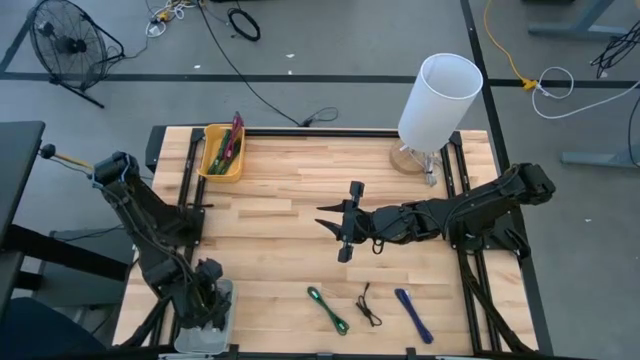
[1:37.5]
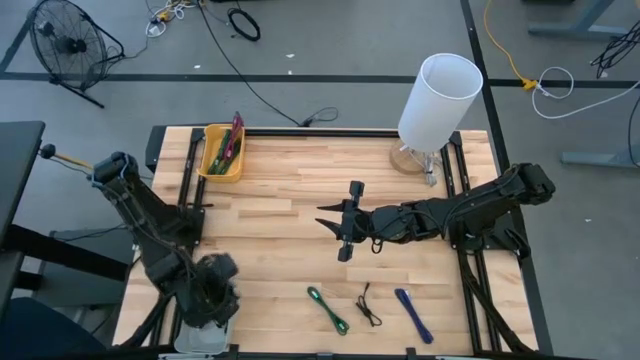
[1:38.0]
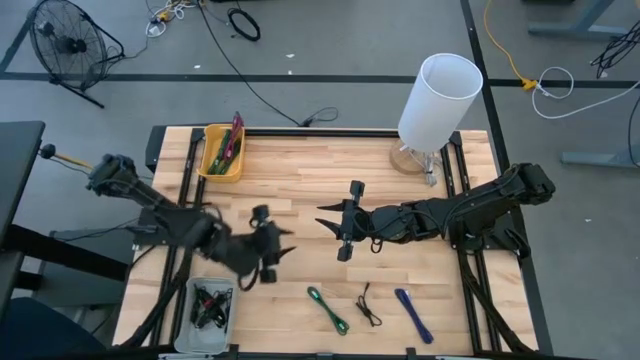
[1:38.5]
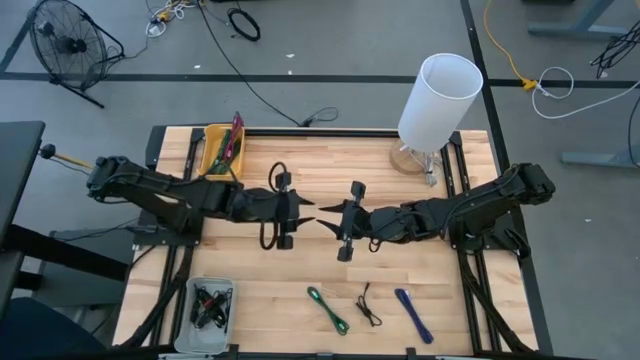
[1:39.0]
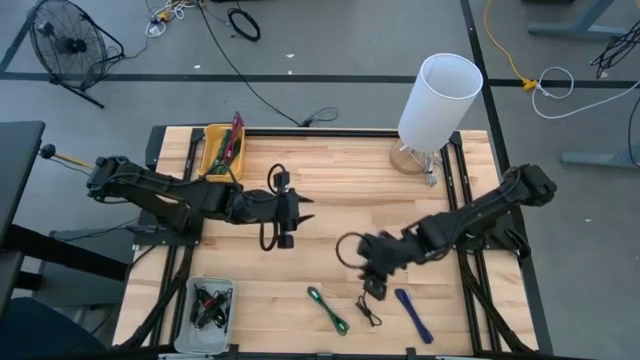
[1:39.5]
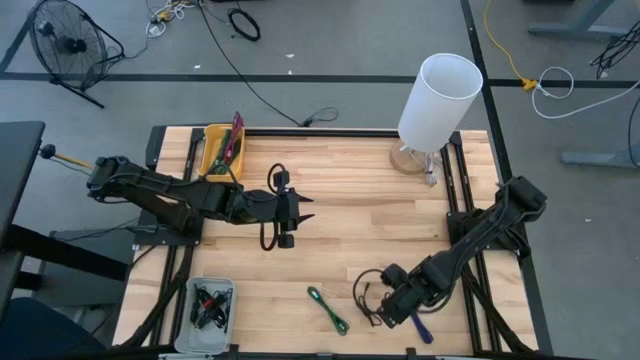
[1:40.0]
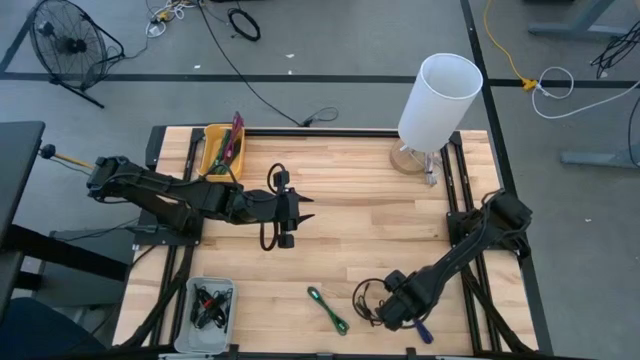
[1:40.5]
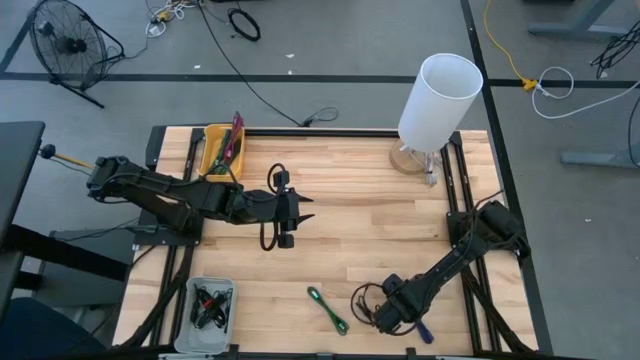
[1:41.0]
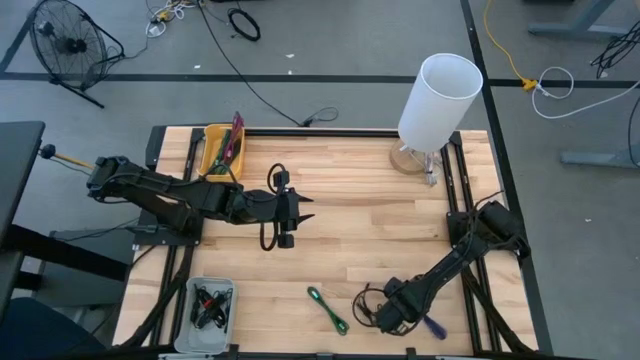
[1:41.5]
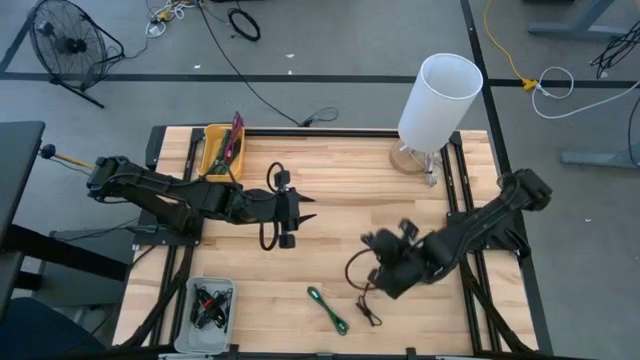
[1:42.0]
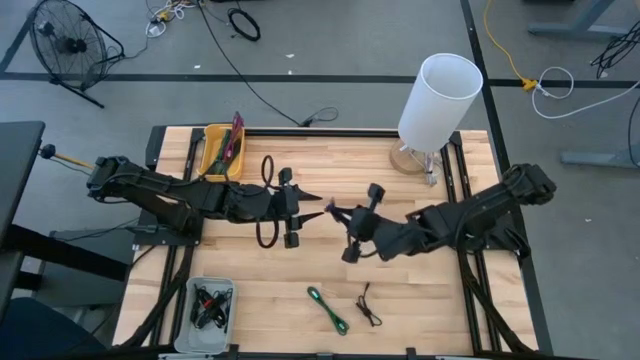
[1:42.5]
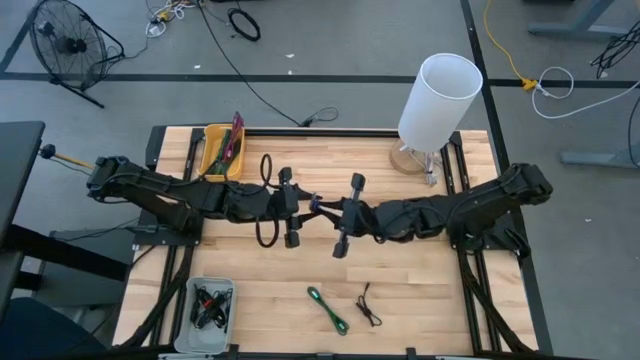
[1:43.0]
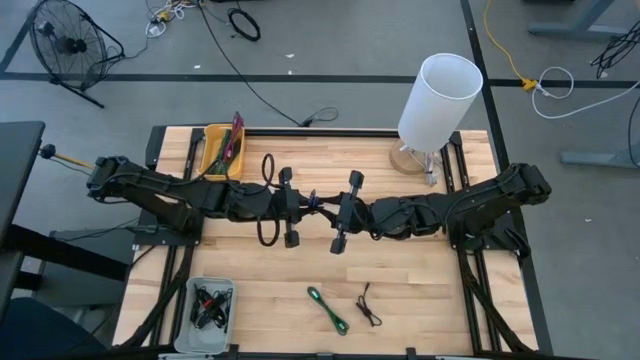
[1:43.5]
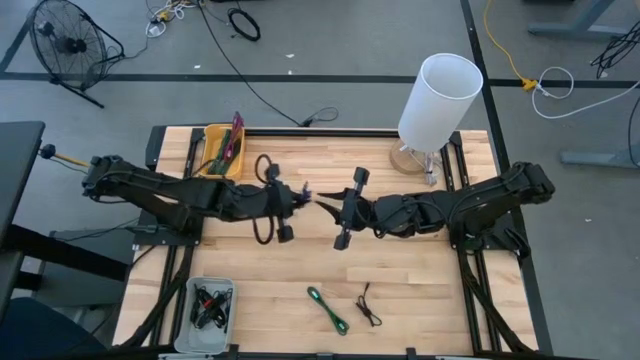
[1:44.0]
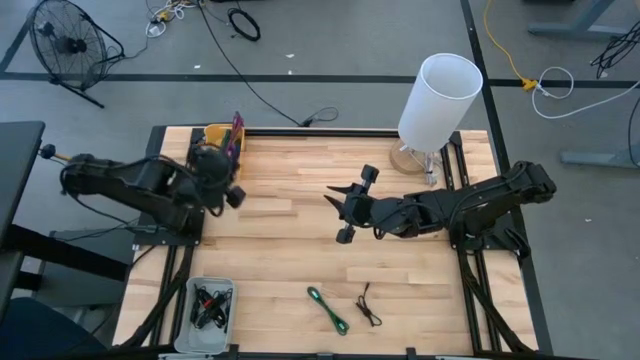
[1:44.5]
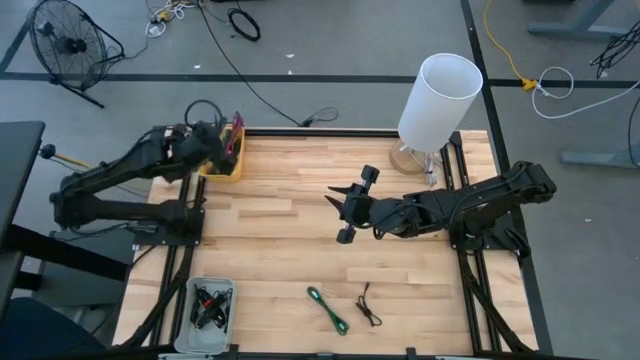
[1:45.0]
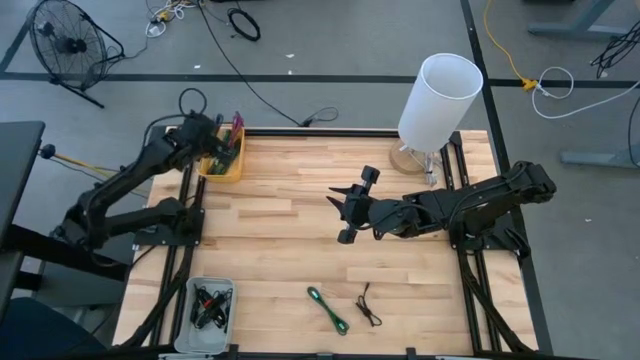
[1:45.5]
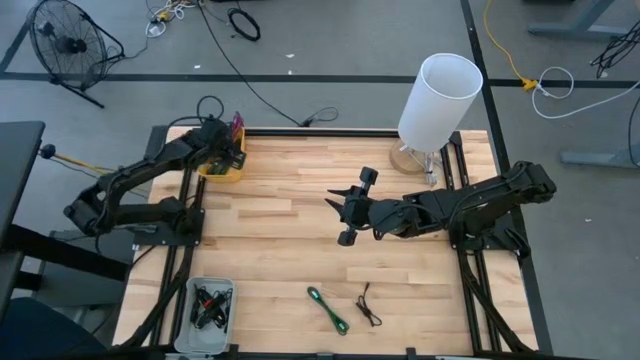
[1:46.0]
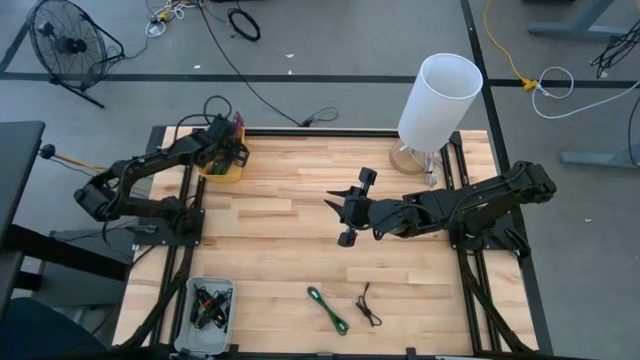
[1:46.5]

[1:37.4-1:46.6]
Task: Pick & Place USB Port
Put the purple charger cable into the yellow bin

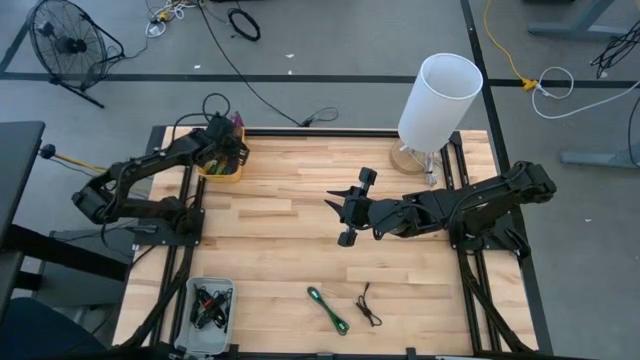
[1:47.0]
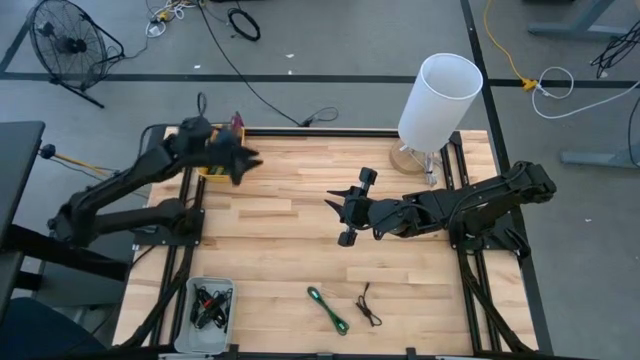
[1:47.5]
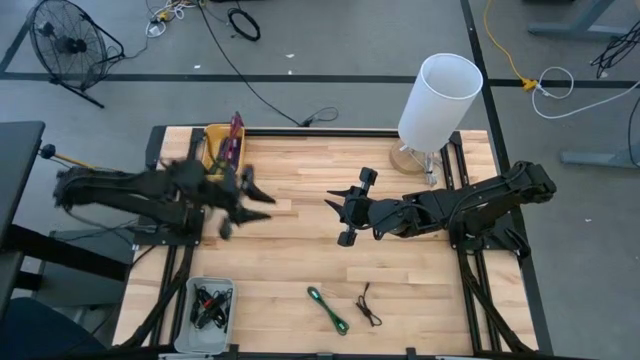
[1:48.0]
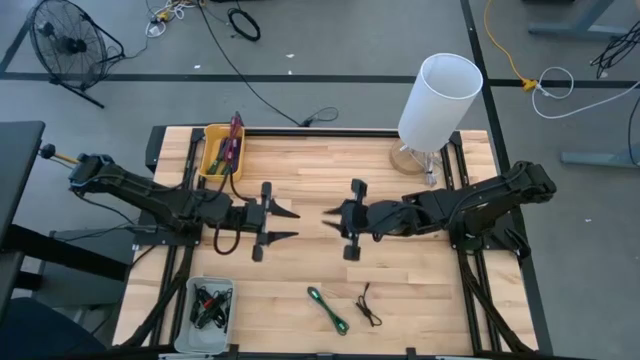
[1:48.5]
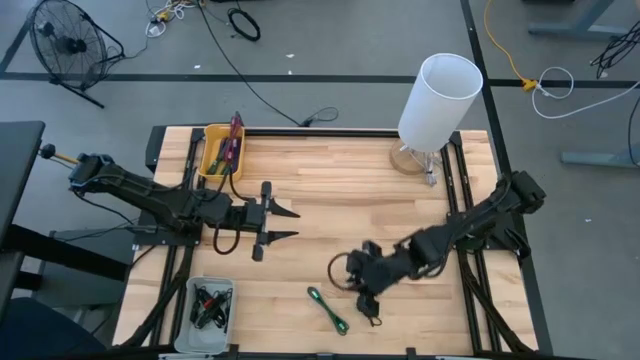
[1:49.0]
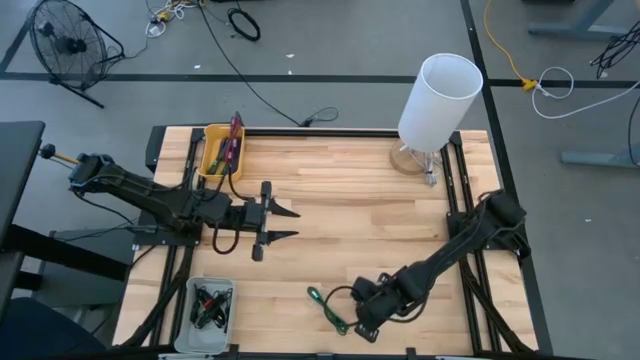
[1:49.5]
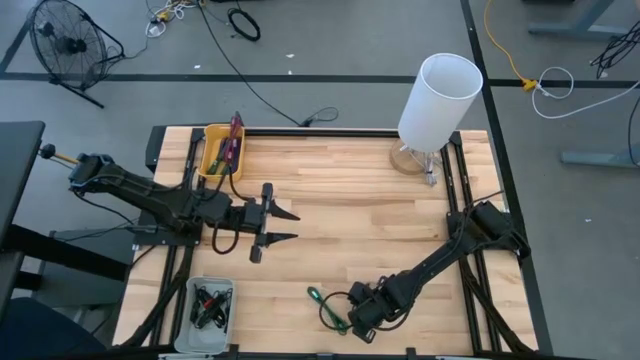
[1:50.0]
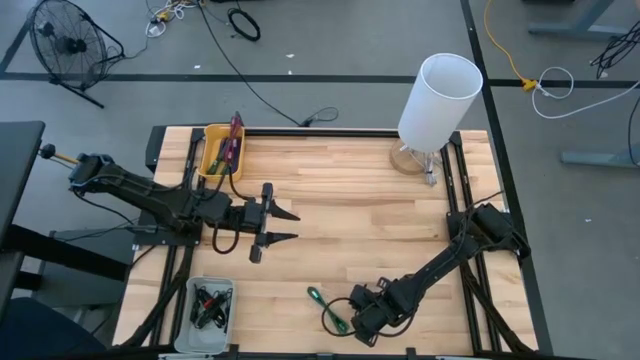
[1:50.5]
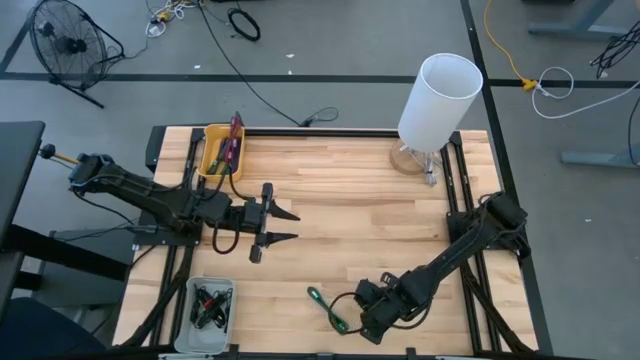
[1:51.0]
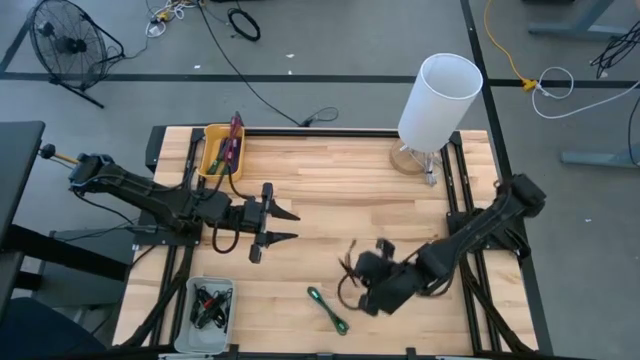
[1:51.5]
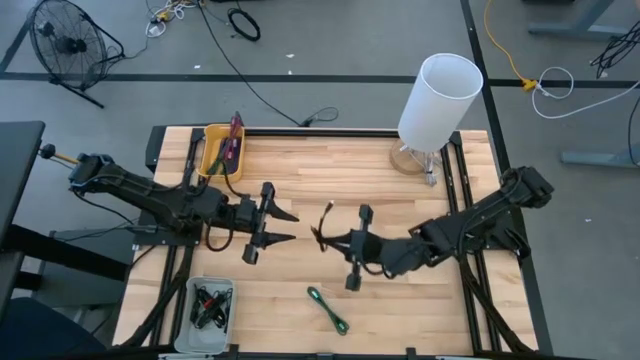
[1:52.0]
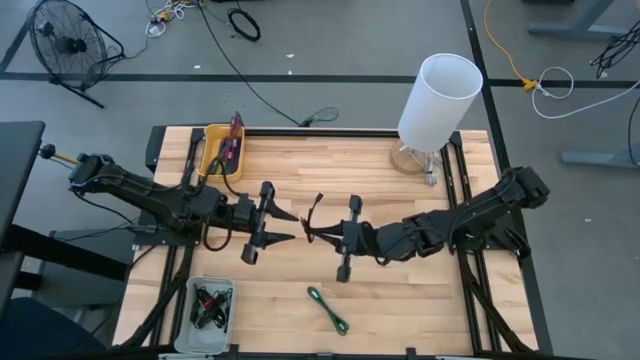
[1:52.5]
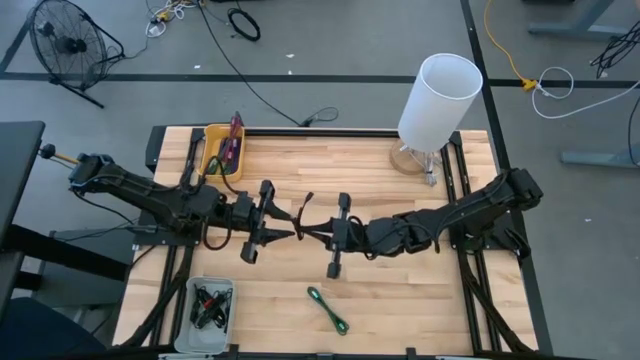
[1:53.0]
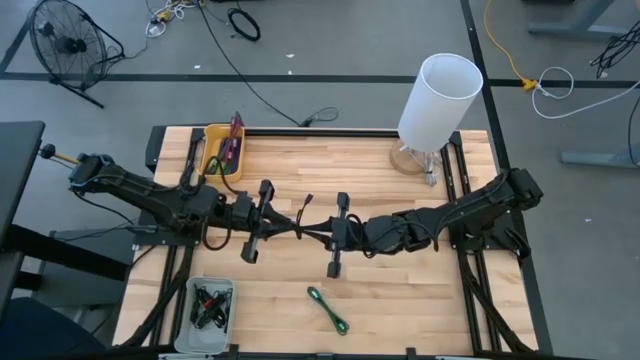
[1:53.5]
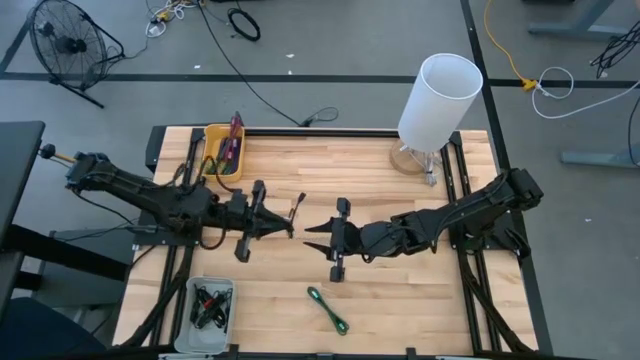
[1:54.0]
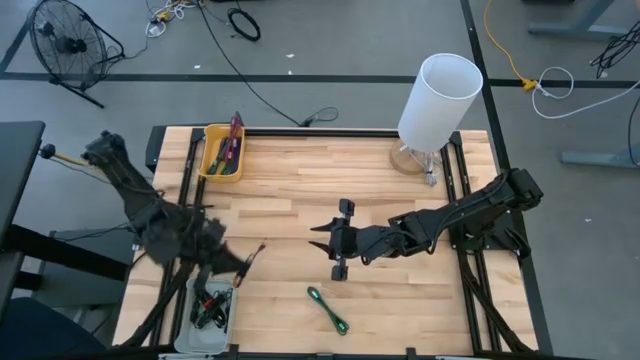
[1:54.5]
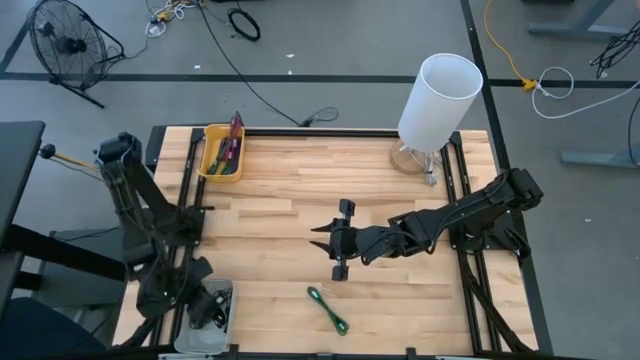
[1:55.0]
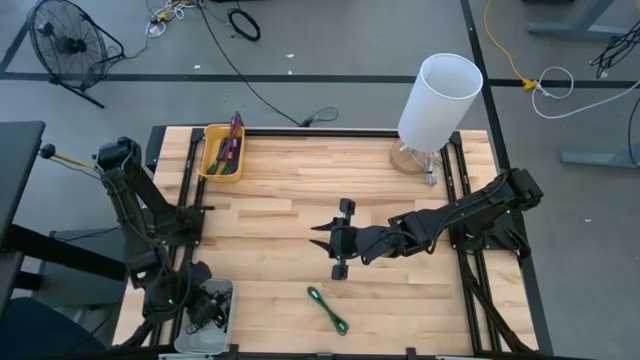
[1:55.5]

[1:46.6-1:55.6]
Put the black charger cable into the gray bin

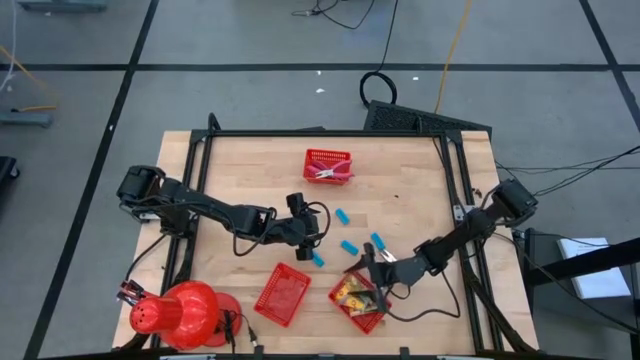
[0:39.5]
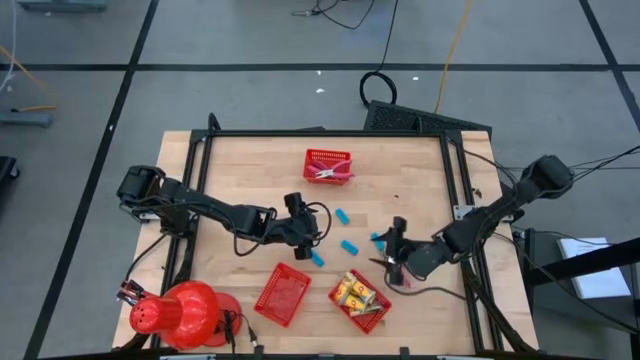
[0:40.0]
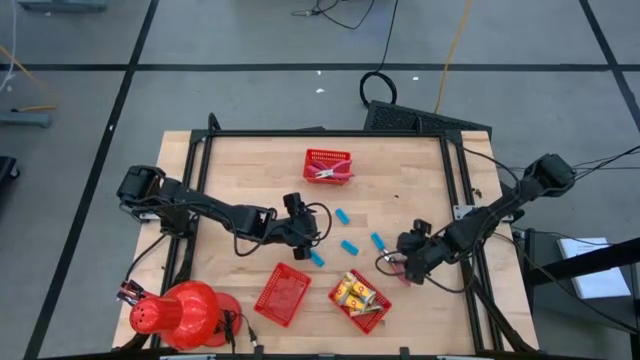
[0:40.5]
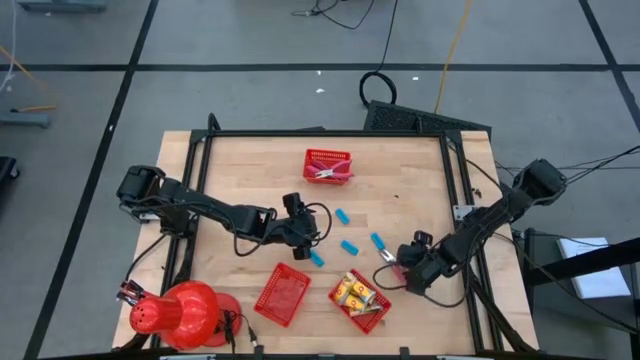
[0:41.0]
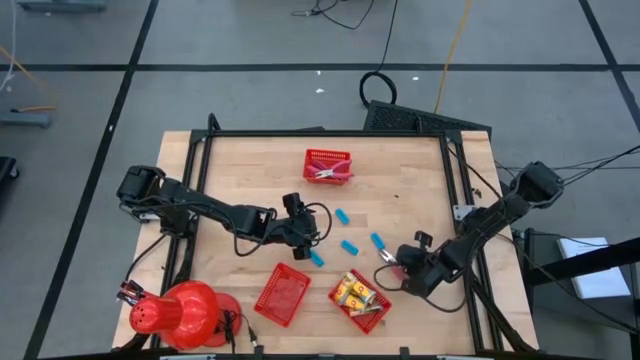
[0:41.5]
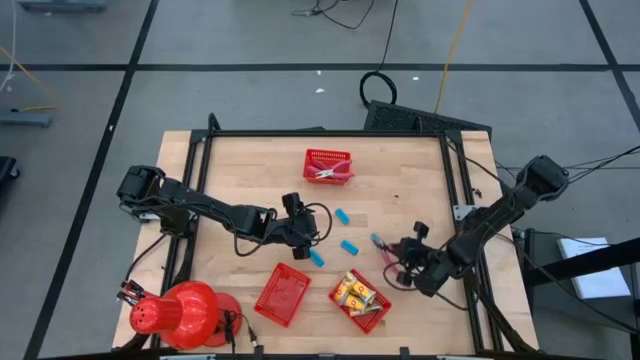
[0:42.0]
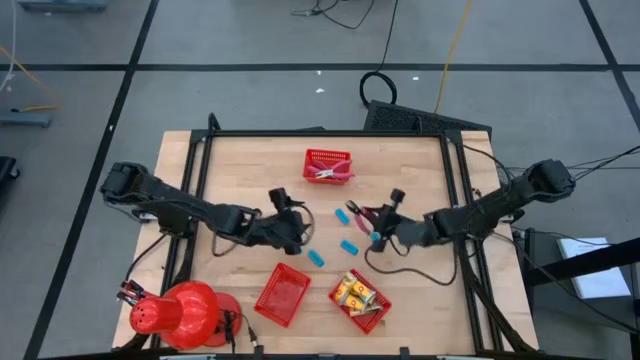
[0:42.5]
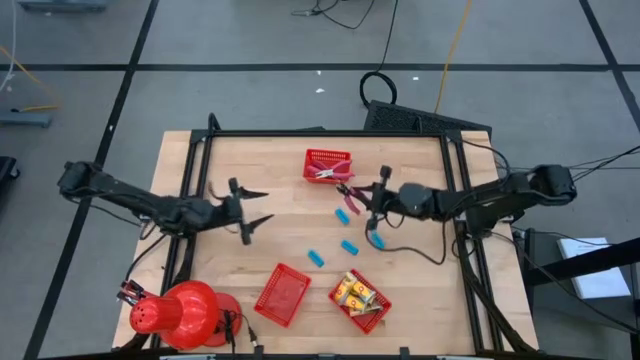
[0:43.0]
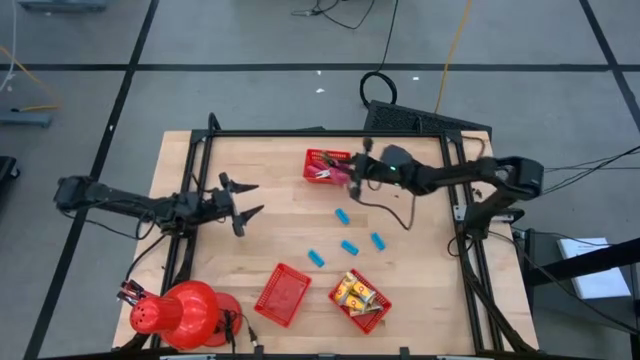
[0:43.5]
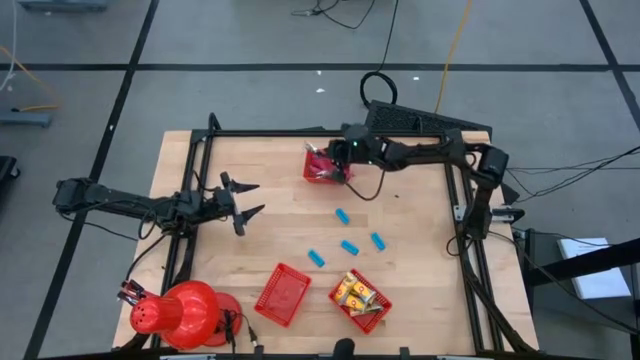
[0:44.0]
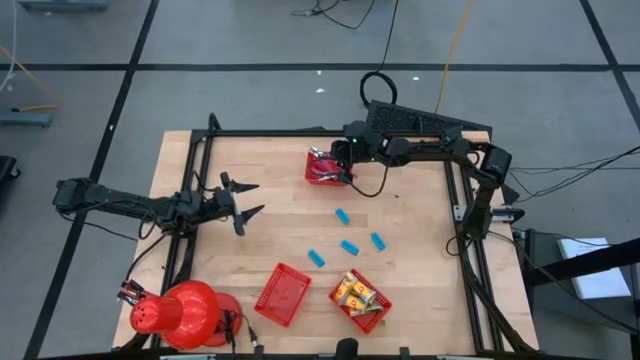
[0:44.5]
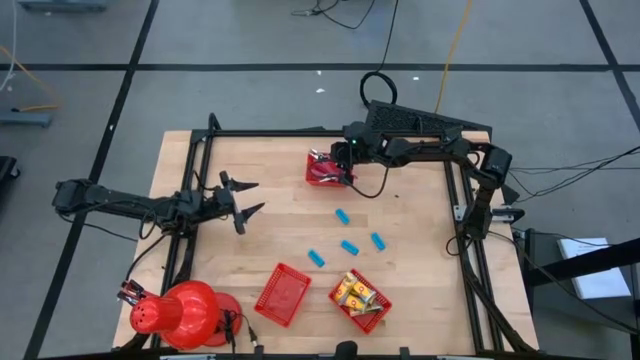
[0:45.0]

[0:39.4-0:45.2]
Task: Pick & Place School Supplies
Put the pink puncher into the top red basket
